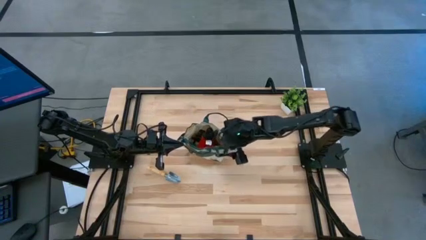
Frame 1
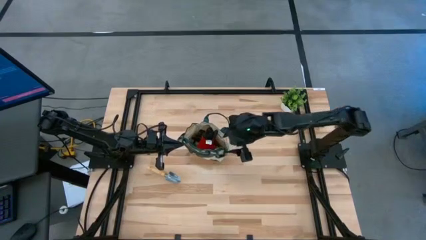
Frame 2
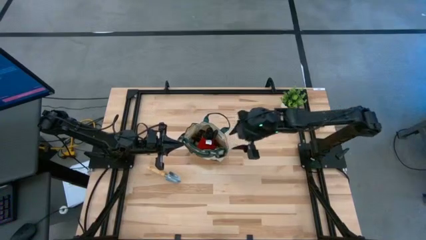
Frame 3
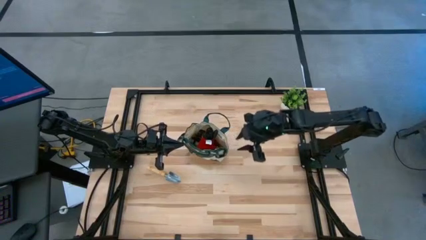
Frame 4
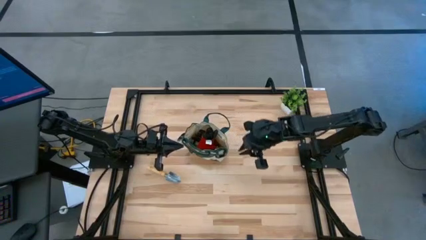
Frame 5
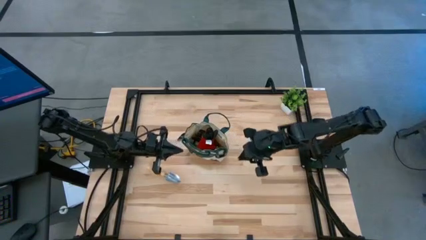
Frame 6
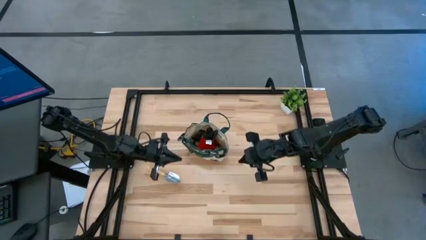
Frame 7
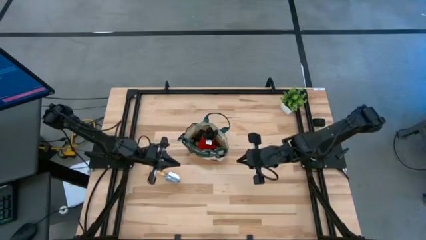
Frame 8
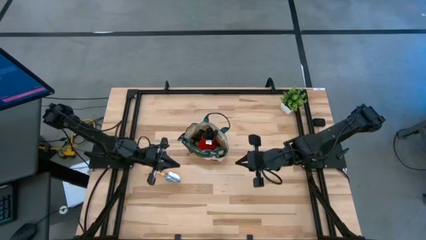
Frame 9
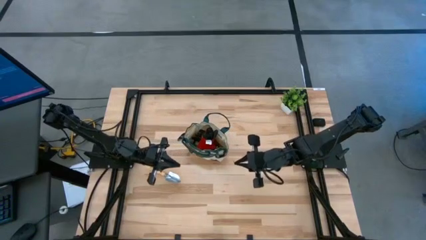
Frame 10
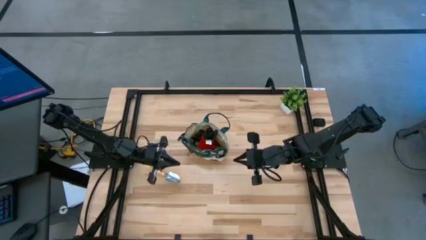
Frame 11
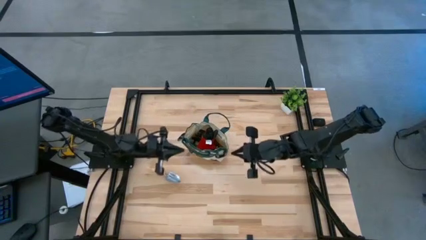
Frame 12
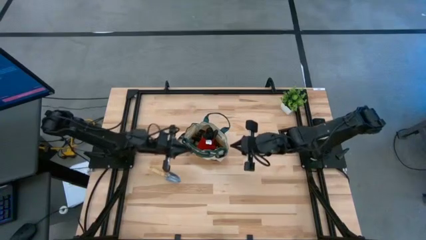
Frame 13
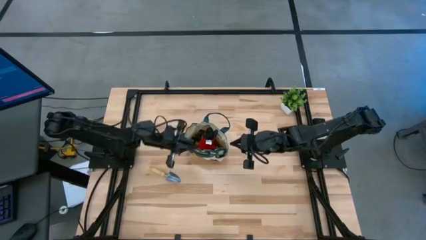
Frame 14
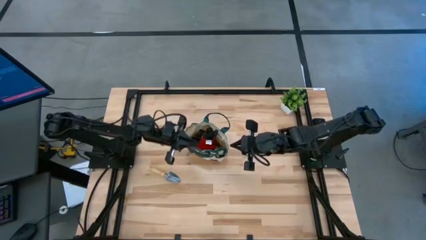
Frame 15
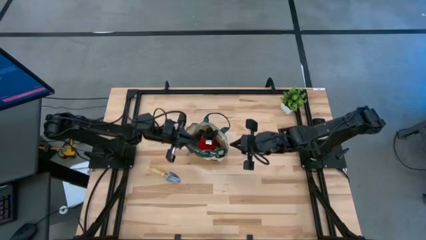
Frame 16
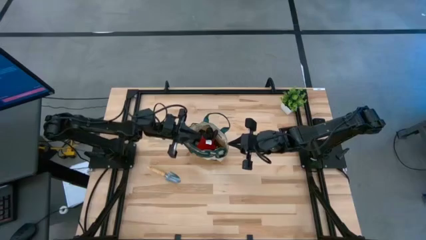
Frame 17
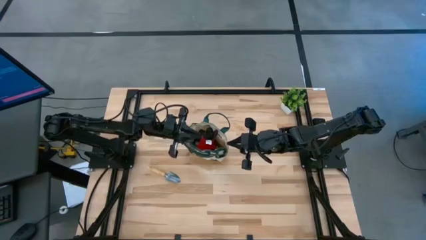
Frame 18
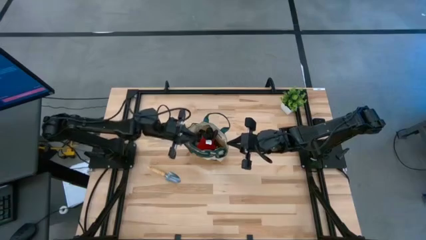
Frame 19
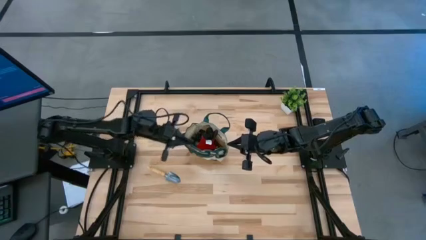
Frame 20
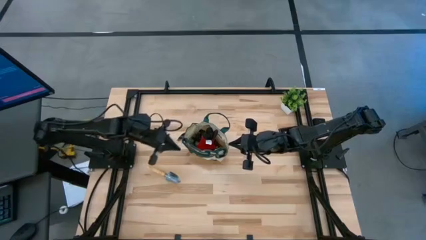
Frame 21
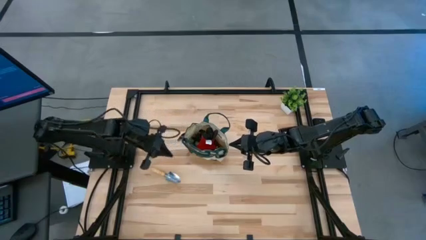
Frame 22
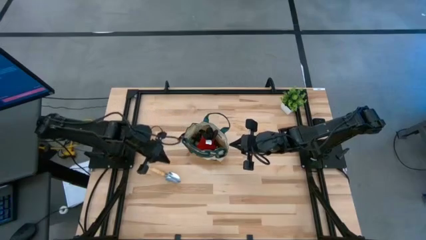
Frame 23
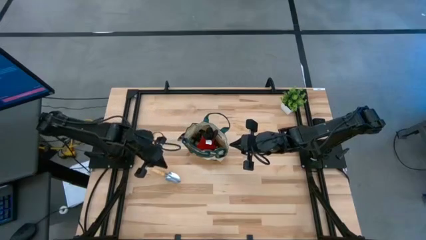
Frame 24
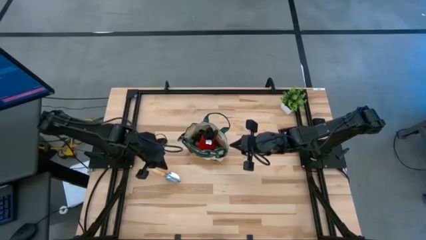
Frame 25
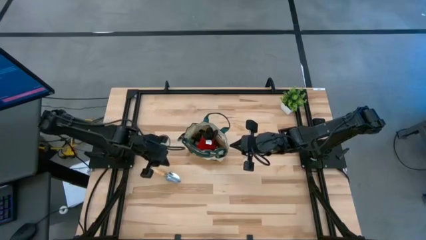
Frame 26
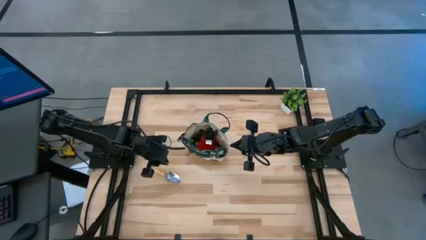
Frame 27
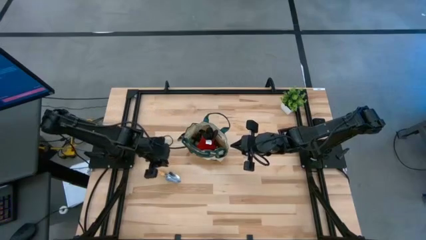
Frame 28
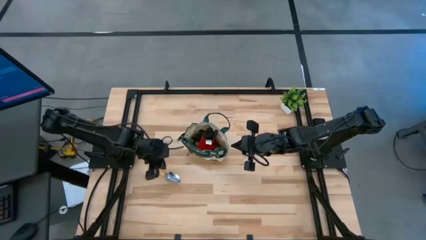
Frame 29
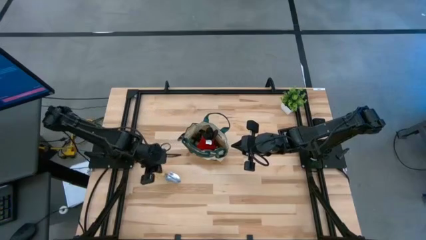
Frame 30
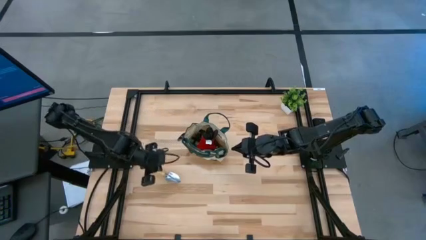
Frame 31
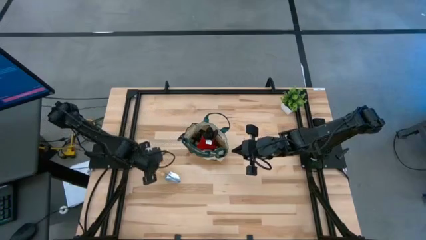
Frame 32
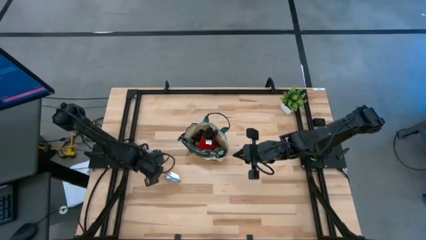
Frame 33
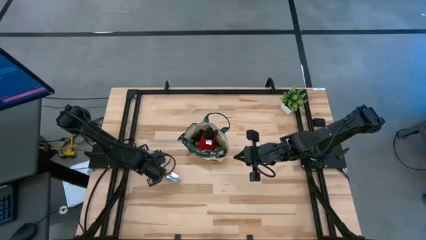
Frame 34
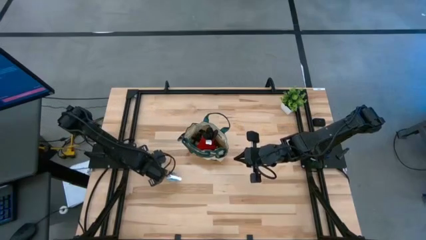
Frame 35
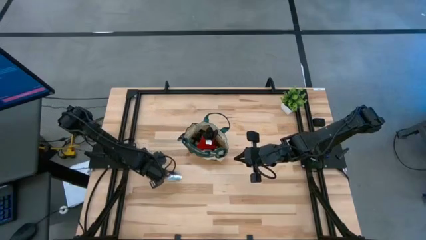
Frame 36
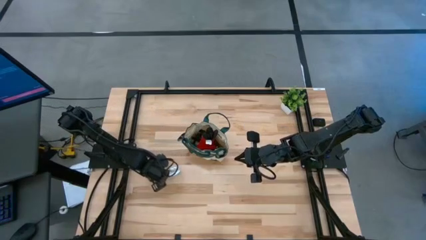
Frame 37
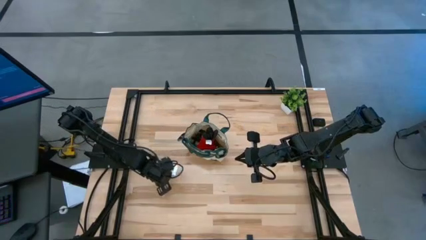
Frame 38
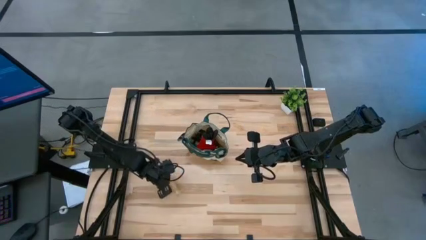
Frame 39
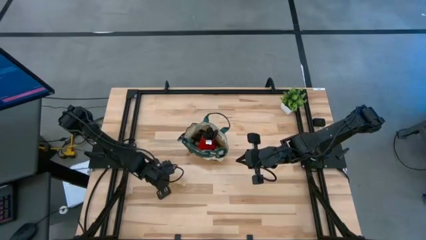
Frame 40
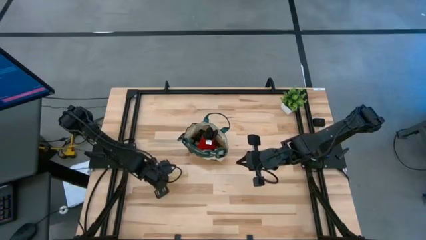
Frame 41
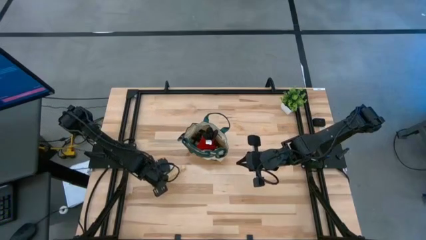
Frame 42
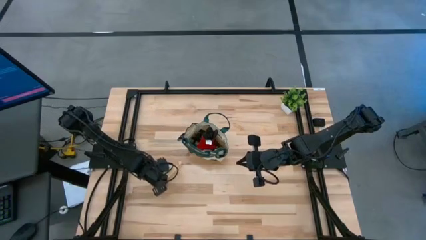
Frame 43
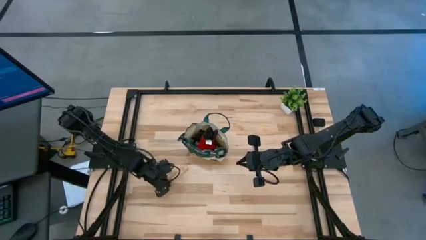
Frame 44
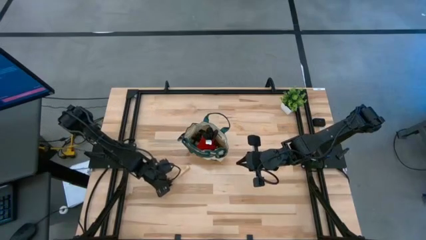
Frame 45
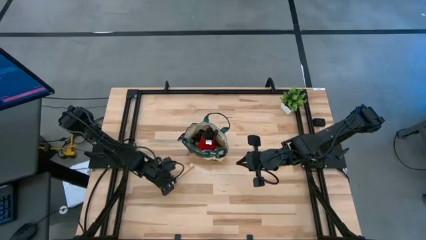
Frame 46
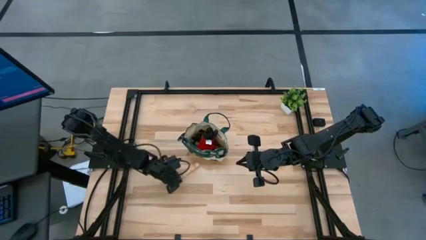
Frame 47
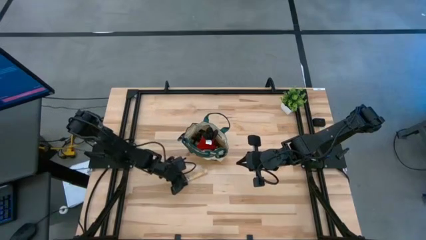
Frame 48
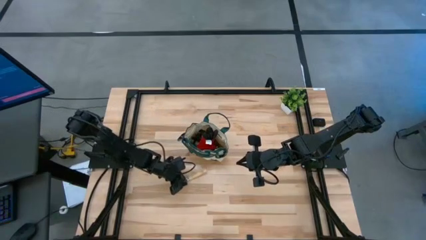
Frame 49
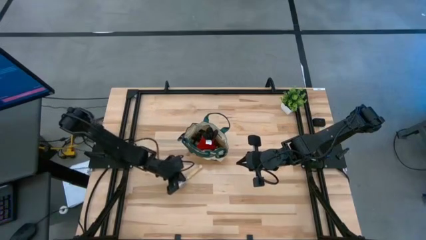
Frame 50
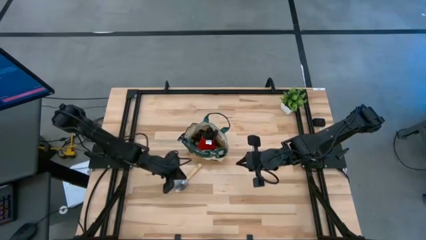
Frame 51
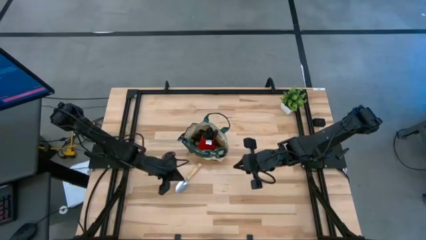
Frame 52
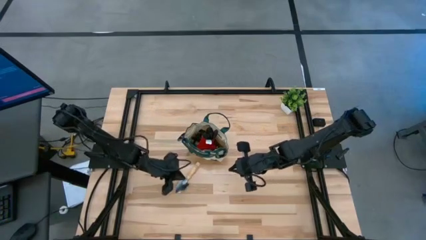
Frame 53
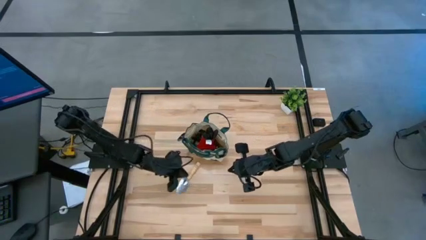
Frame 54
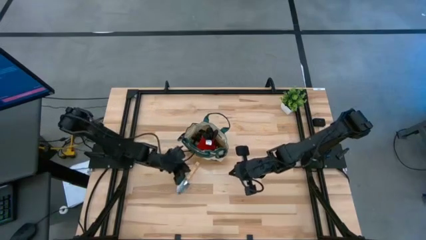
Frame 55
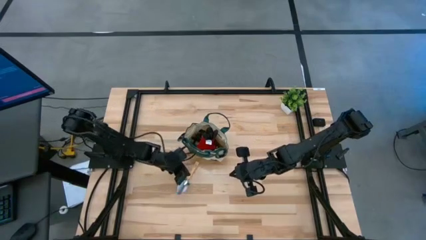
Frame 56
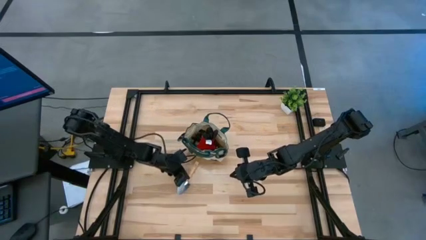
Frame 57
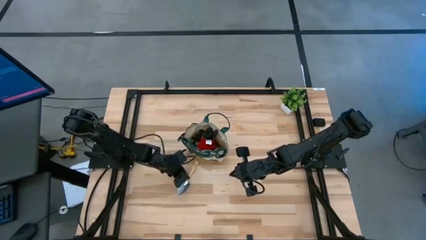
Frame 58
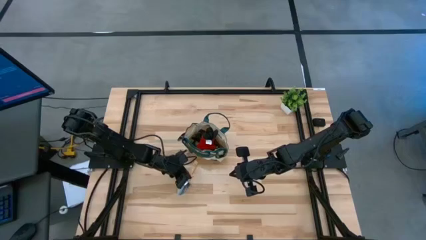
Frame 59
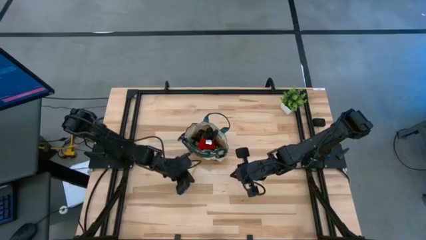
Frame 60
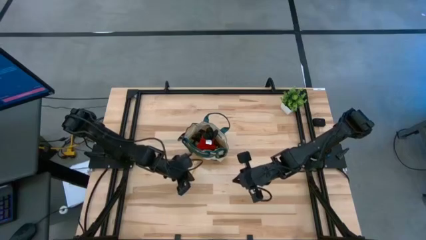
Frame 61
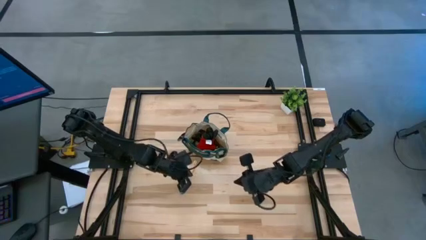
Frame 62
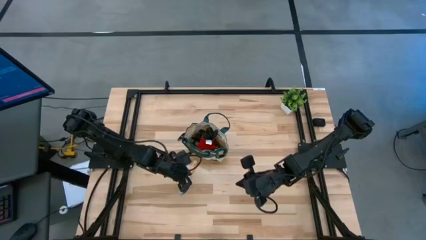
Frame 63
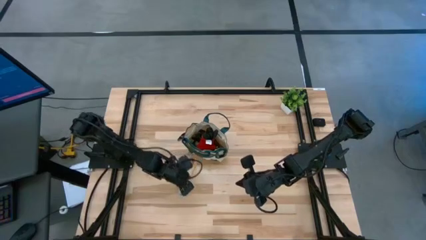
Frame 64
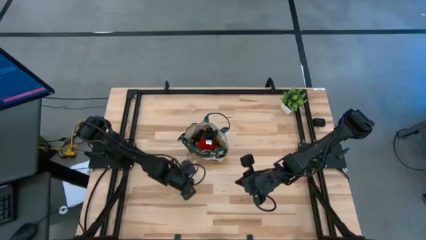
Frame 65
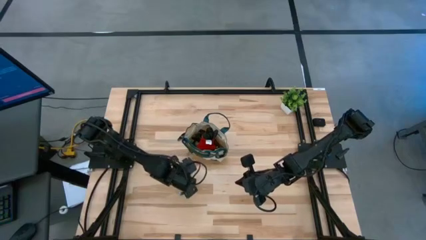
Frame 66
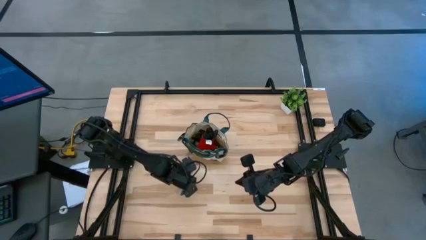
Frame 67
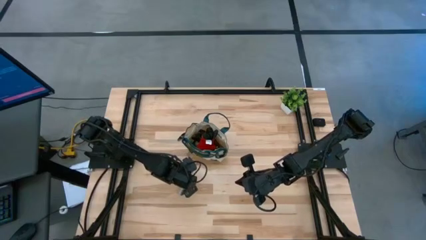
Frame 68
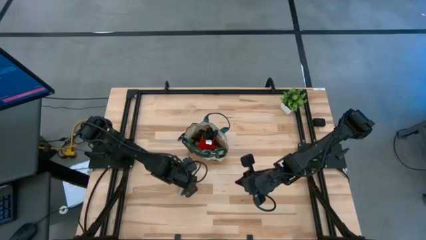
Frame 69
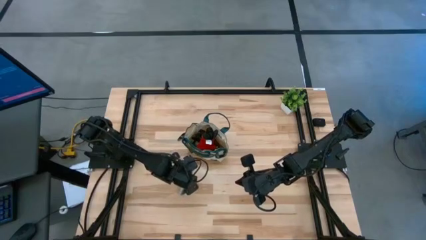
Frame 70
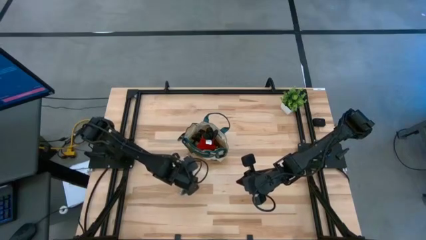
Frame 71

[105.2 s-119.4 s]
Task: Pick & Place Garden tools in Gardening bag
Put the brown trowel into the brown gardening bag

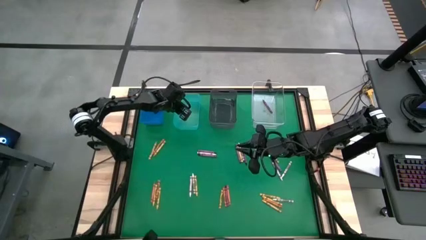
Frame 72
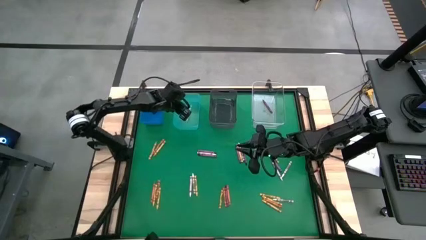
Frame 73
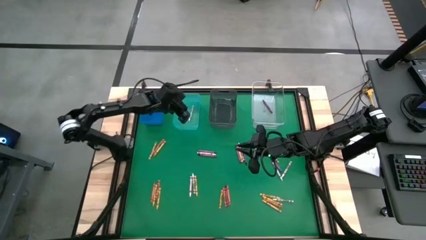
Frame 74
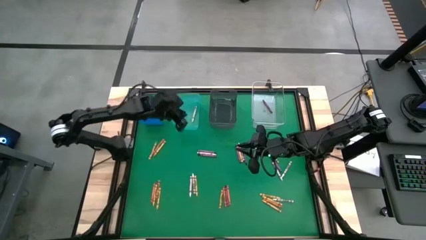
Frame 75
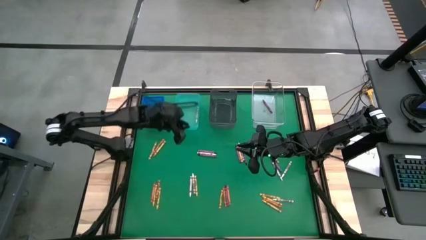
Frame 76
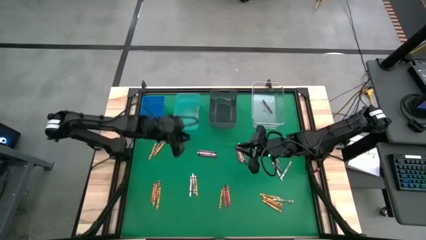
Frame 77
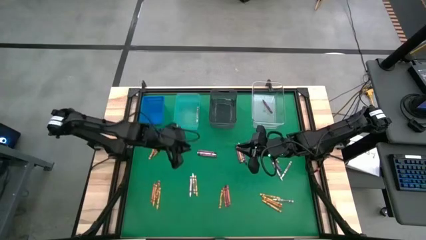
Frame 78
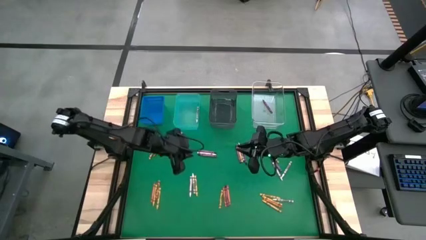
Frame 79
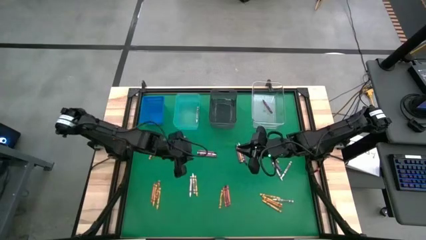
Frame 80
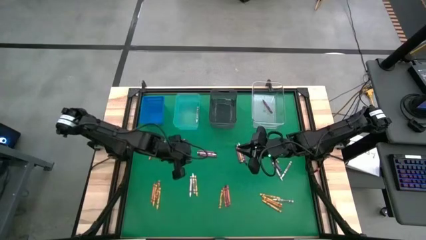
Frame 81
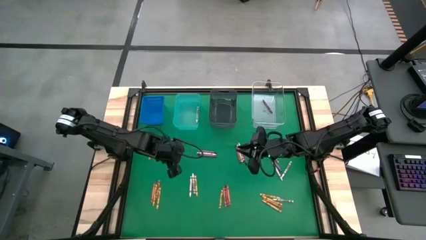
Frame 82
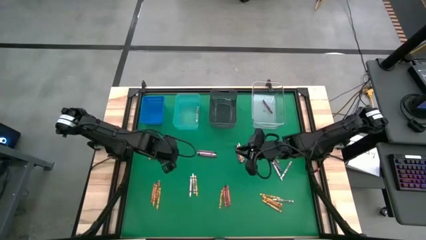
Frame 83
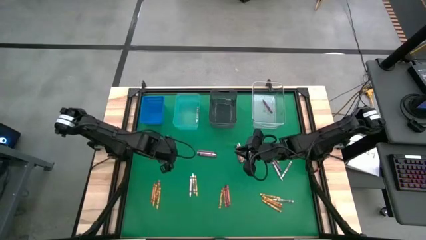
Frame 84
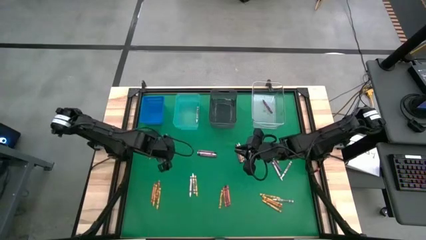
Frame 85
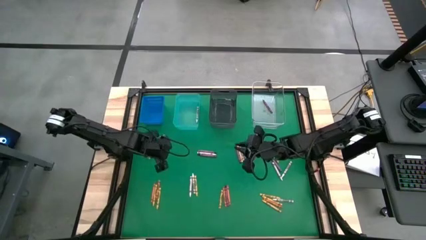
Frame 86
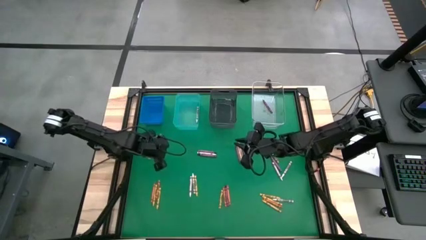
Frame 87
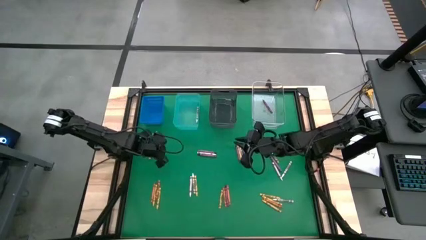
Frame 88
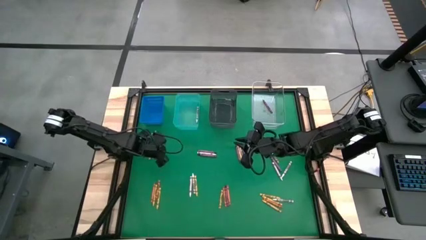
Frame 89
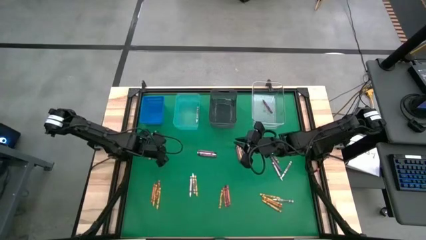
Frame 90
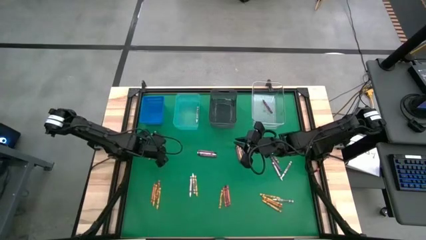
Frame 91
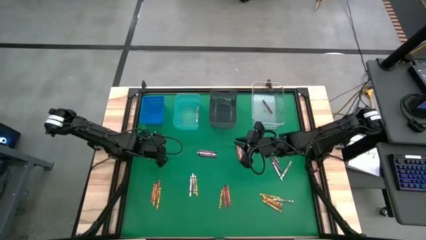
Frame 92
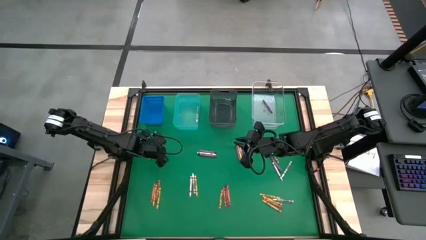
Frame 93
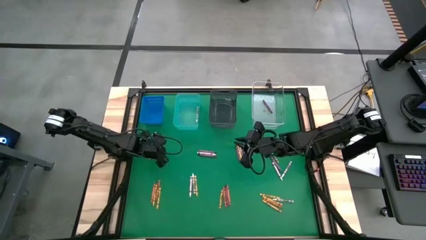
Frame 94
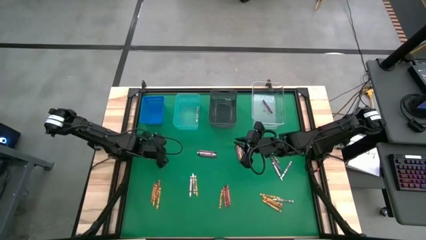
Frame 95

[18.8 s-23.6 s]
Task: Sort crayons
Put the yellow crayon into the black bin
